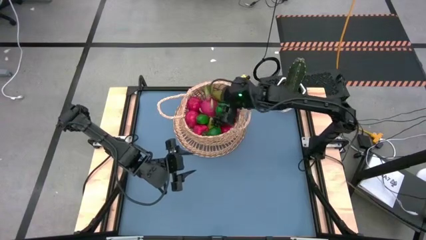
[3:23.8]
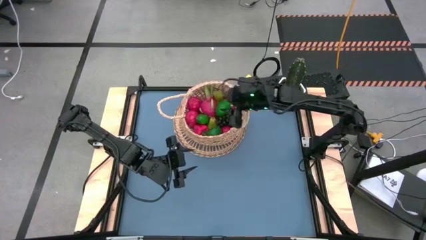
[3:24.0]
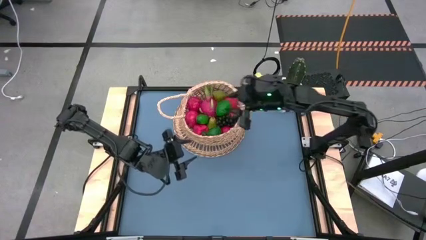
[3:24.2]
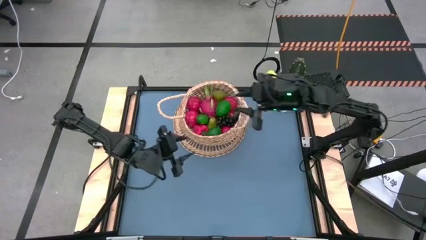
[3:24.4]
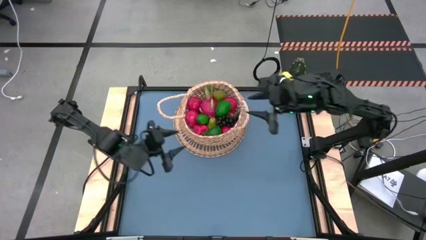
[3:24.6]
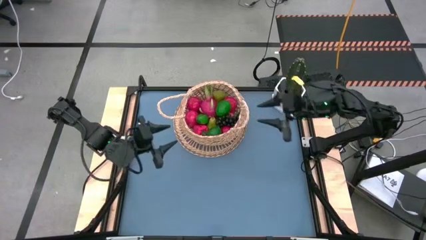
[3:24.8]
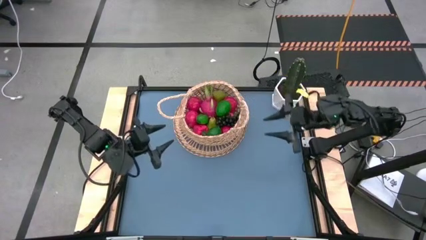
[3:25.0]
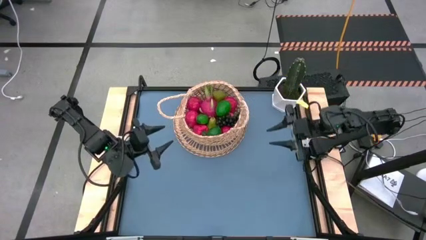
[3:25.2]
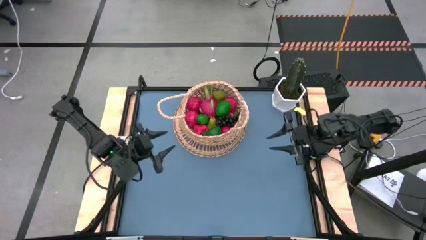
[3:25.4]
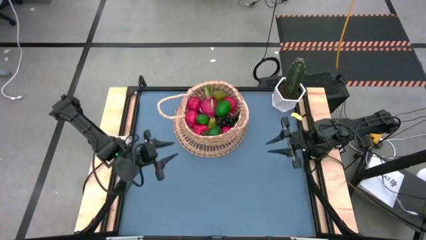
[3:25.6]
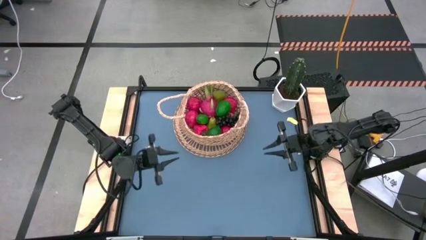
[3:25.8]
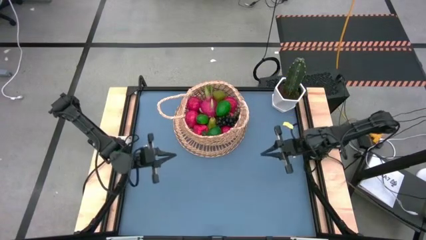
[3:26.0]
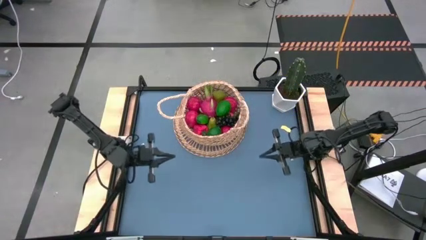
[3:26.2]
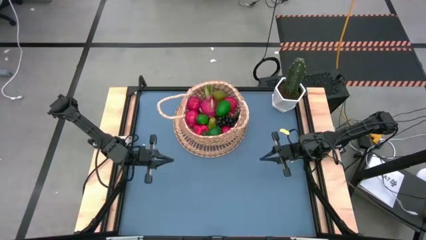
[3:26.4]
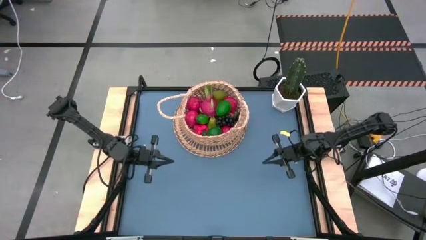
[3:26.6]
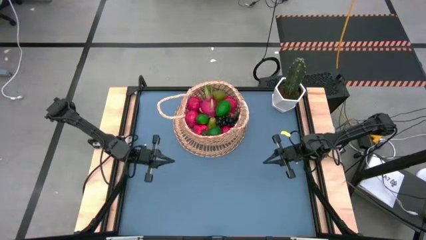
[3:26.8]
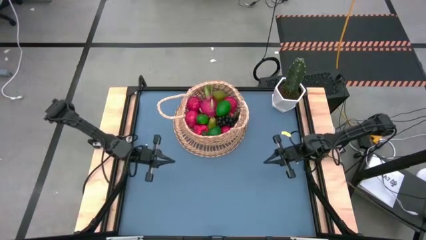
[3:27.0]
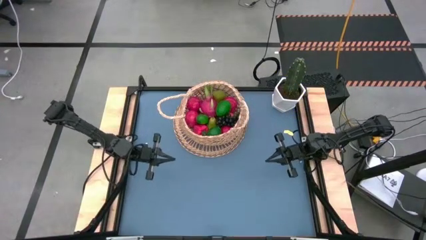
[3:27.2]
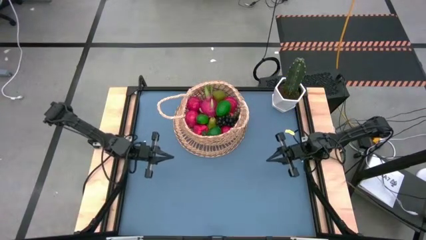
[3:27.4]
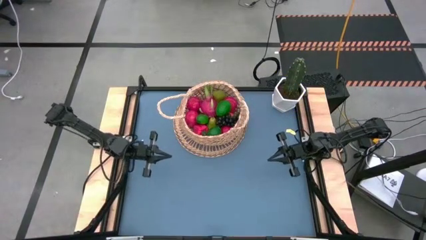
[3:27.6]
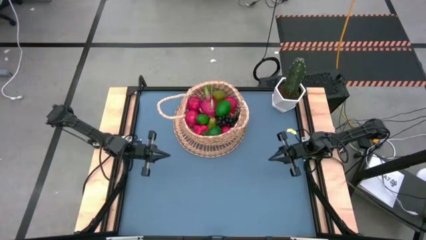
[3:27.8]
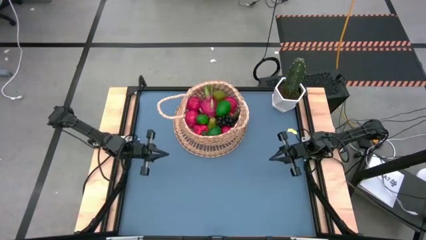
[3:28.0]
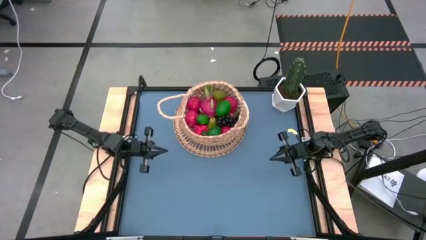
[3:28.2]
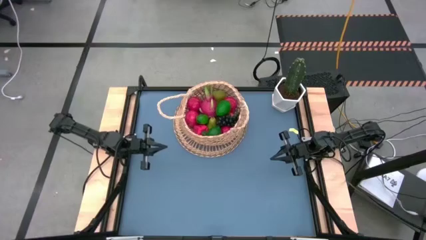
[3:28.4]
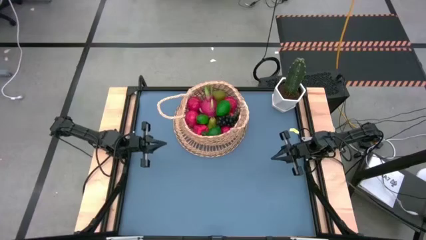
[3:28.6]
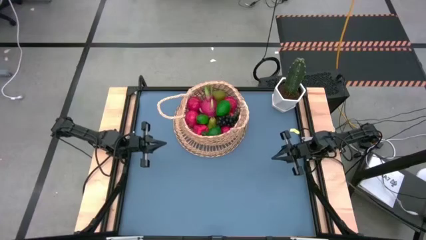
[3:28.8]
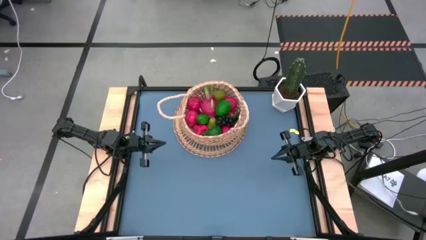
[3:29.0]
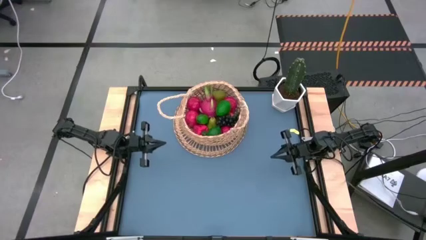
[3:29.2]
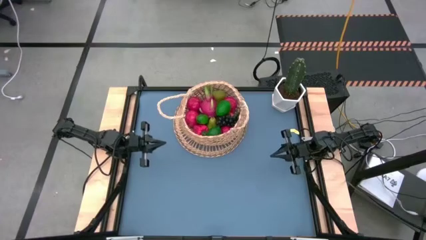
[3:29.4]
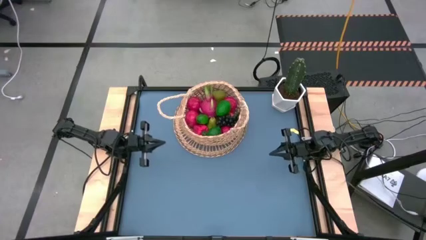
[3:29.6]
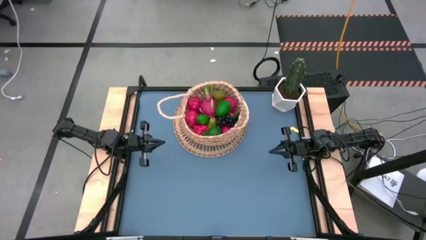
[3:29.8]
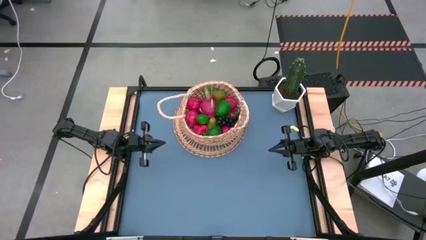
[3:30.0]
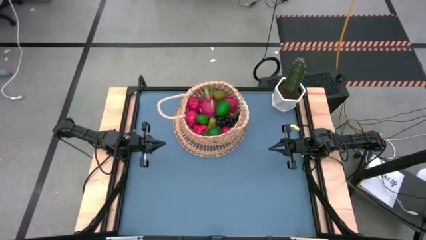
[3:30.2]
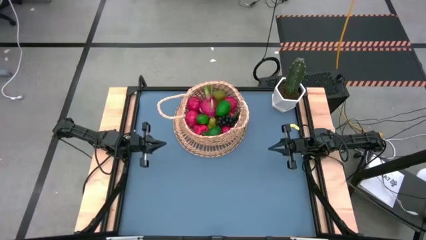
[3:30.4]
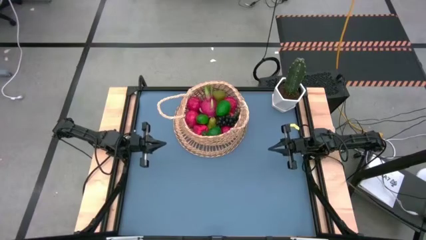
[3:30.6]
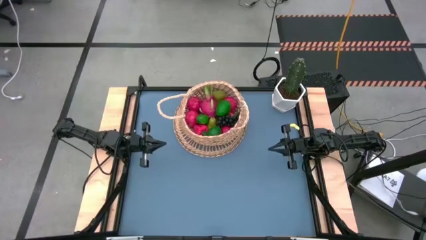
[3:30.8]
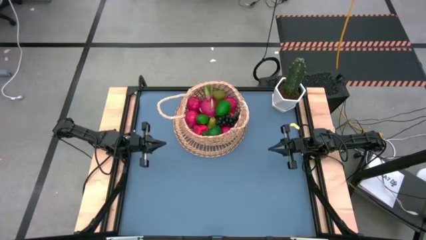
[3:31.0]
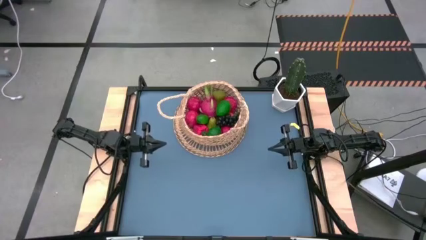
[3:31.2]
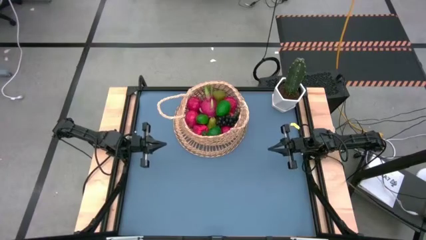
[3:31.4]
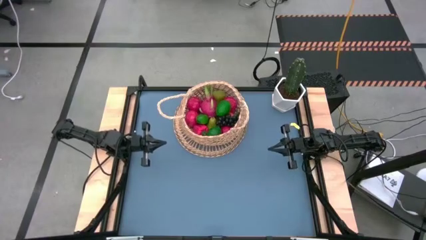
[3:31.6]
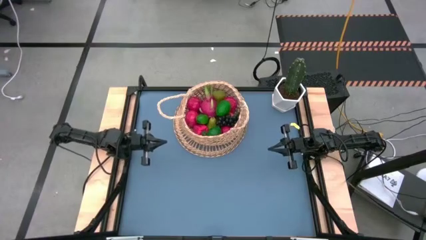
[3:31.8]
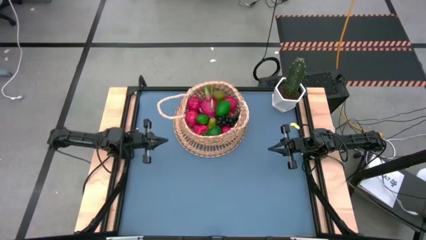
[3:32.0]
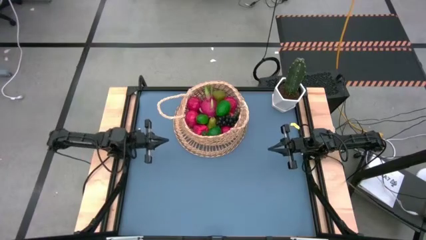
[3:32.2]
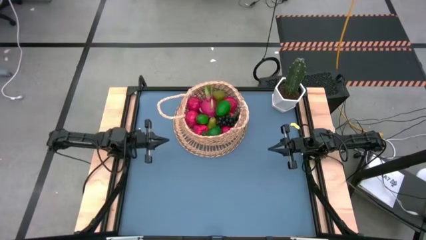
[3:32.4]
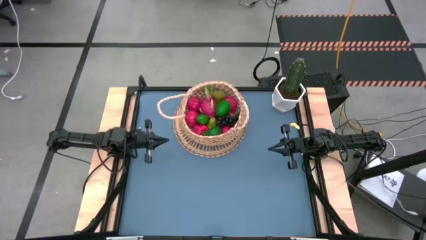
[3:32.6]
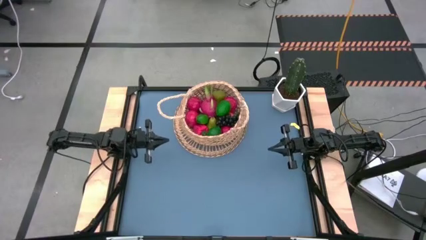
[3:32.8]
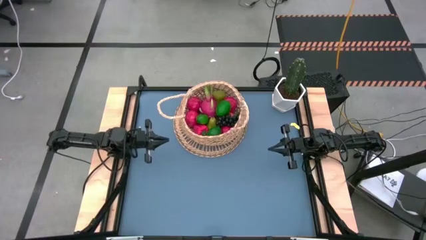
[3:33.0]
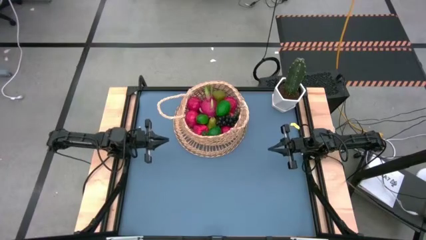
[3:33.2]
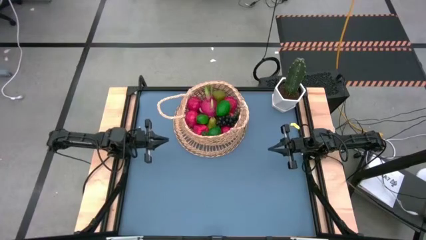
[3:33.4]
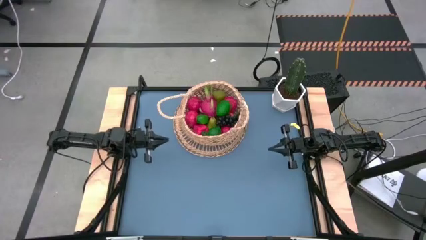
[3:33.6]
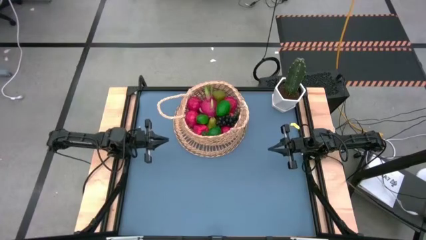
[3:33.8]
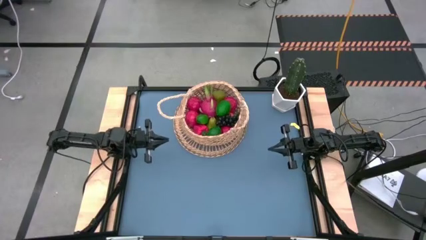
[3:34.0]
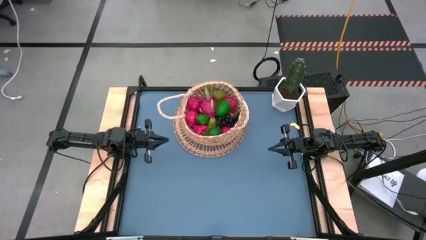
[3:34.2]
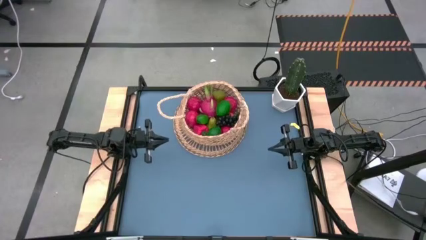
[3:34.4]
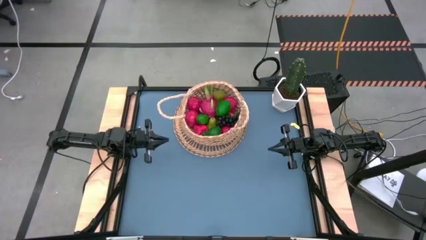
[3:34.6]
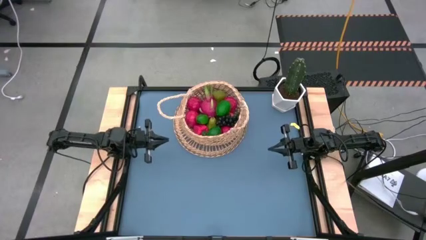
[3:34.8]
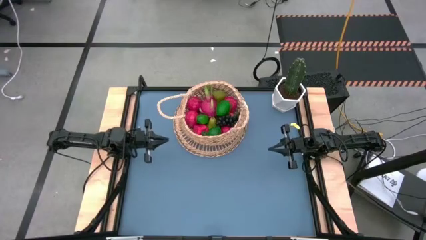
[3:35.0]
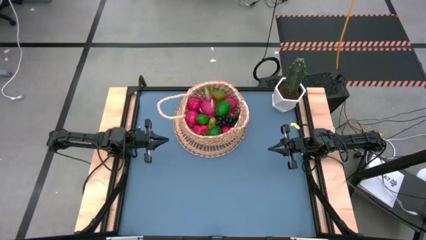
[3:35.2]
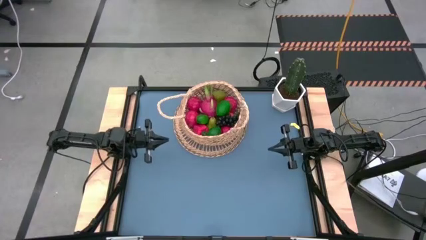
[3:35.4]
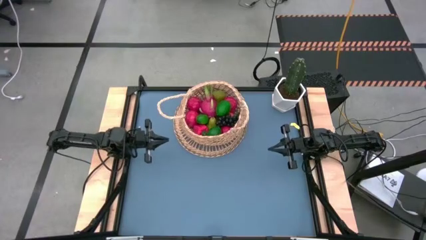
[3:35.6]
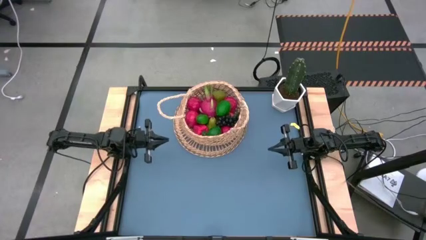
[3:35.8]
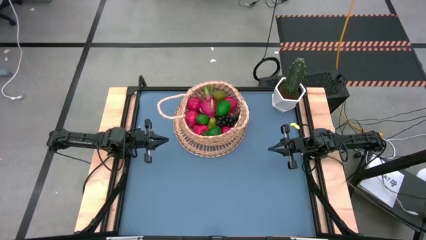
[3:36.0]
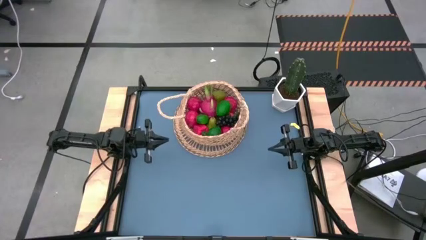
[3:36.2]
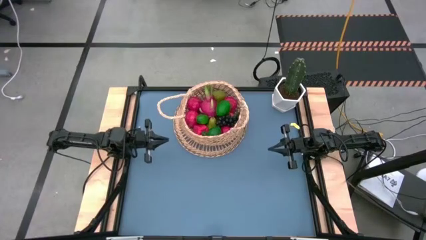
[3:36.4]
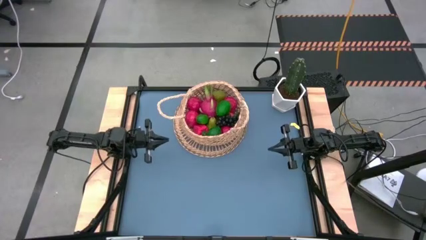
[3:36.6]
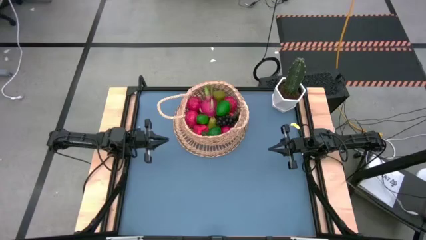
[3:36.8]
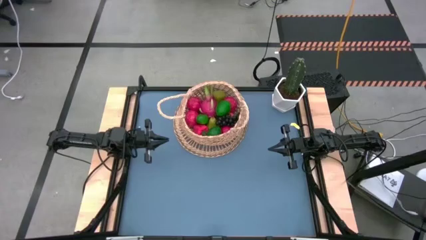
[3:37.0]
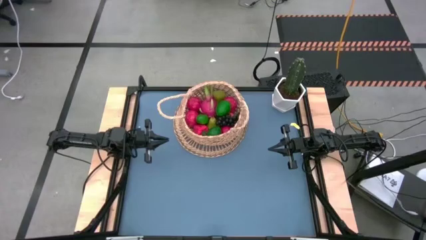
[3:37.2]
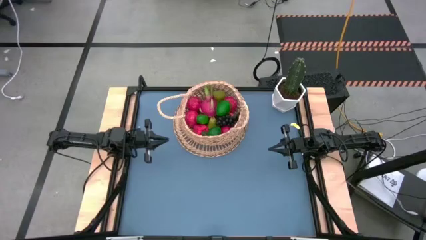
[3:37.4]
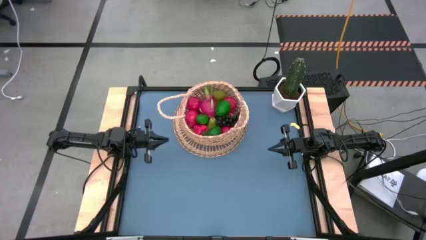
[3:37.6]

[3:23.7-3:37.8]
Task: Build produce basket
Return to Home Position
